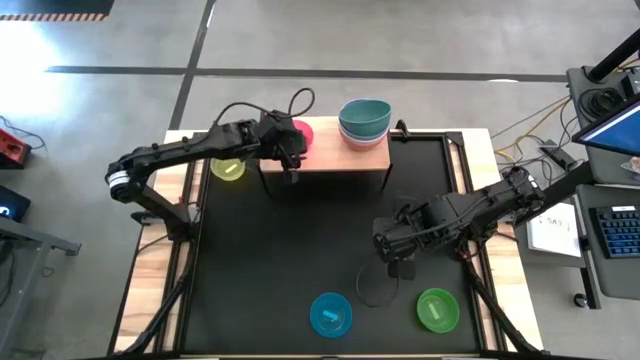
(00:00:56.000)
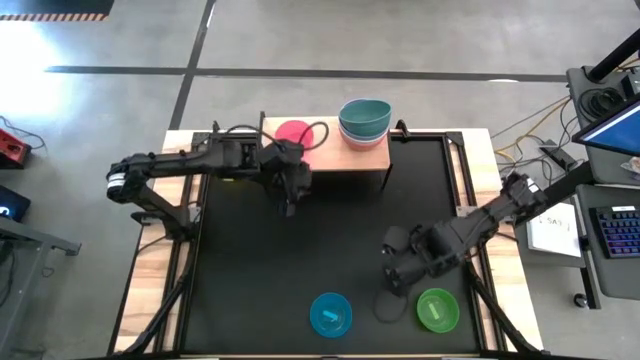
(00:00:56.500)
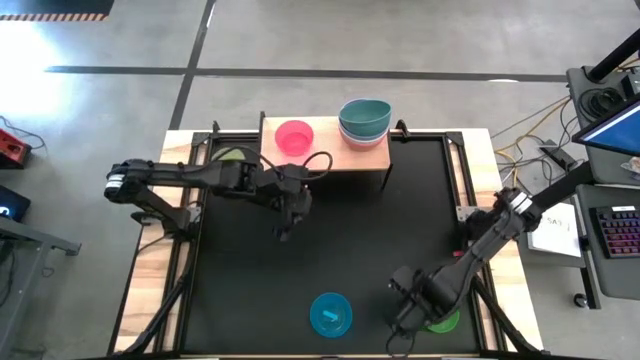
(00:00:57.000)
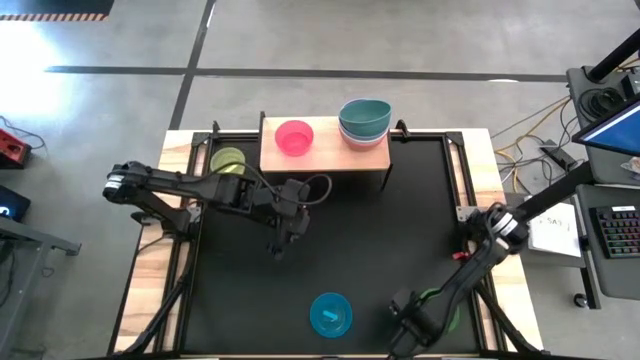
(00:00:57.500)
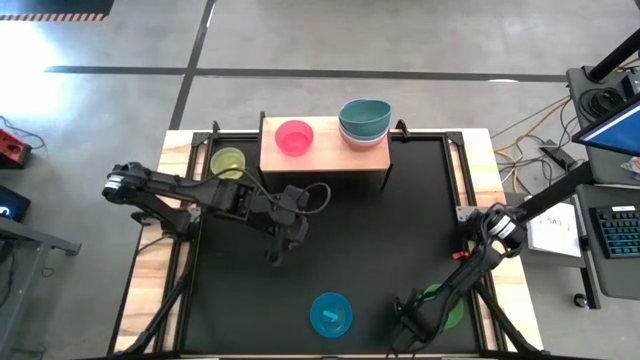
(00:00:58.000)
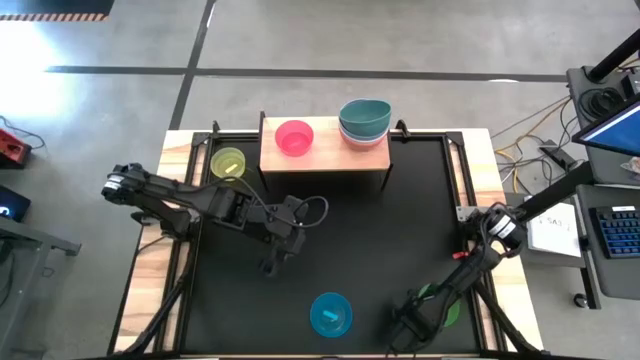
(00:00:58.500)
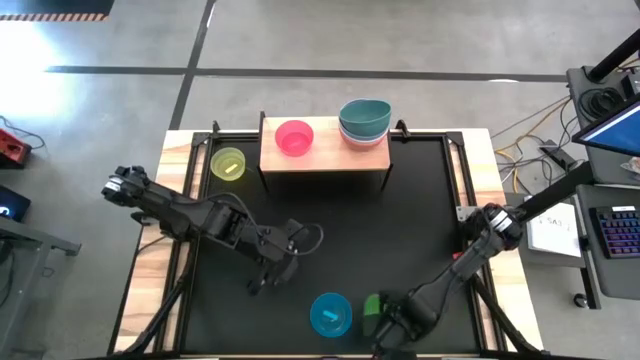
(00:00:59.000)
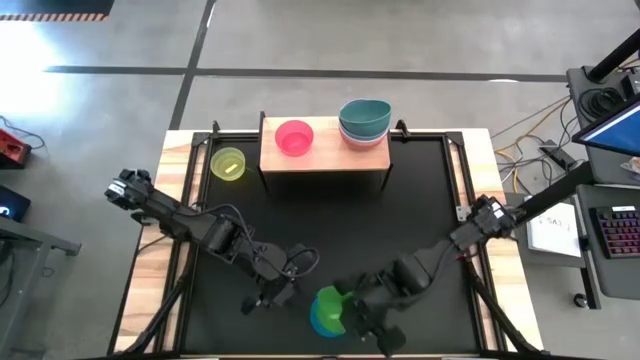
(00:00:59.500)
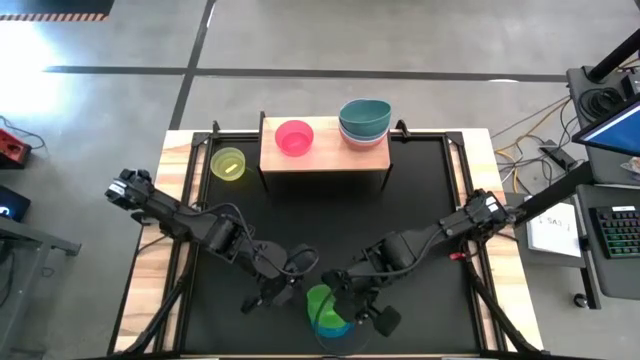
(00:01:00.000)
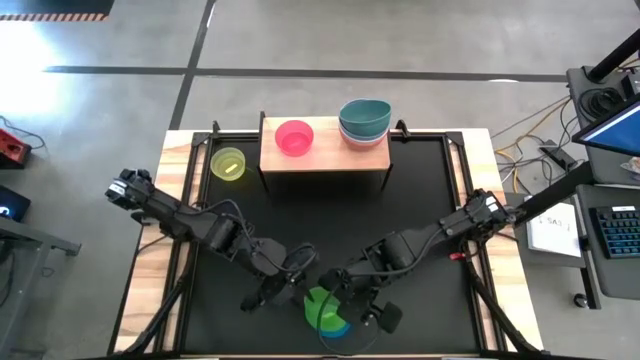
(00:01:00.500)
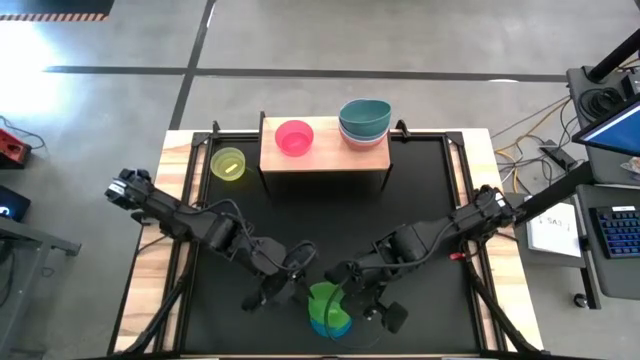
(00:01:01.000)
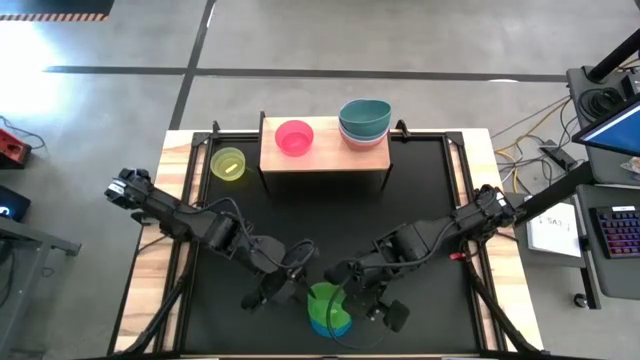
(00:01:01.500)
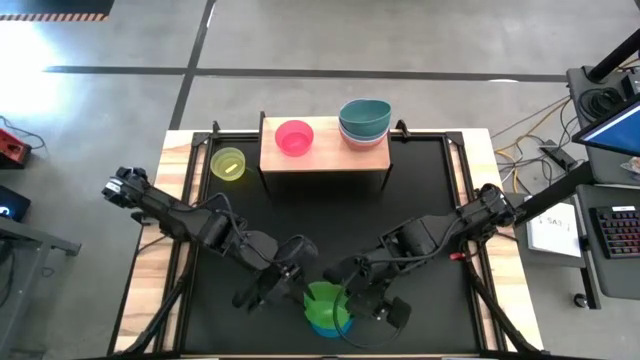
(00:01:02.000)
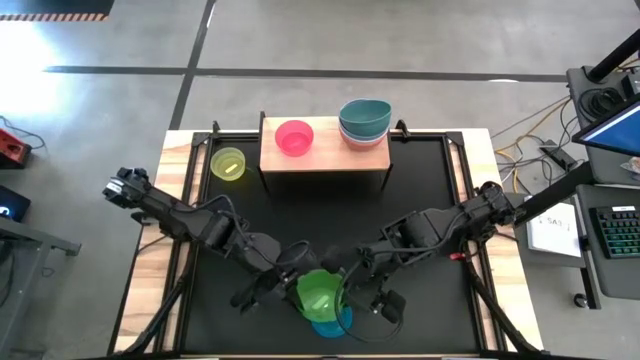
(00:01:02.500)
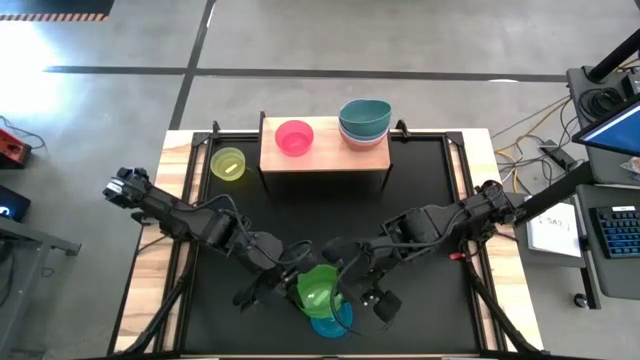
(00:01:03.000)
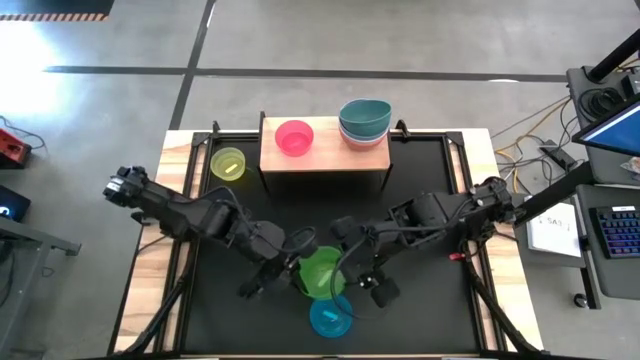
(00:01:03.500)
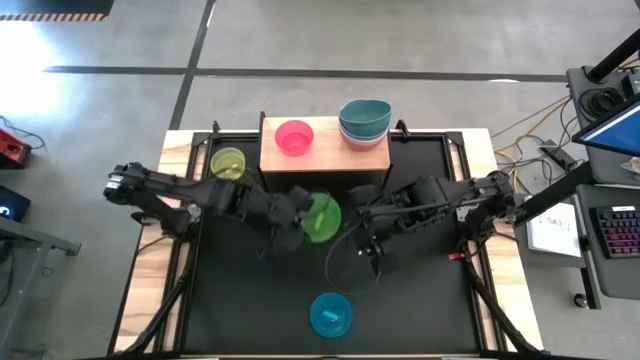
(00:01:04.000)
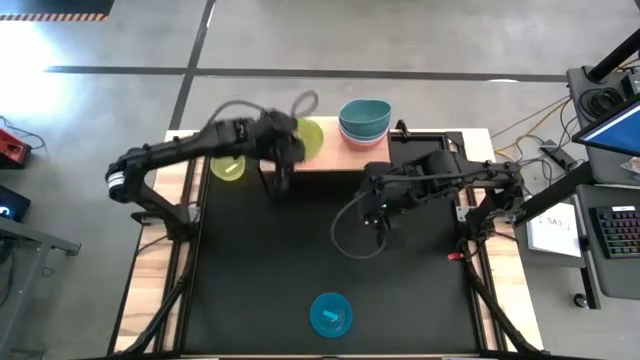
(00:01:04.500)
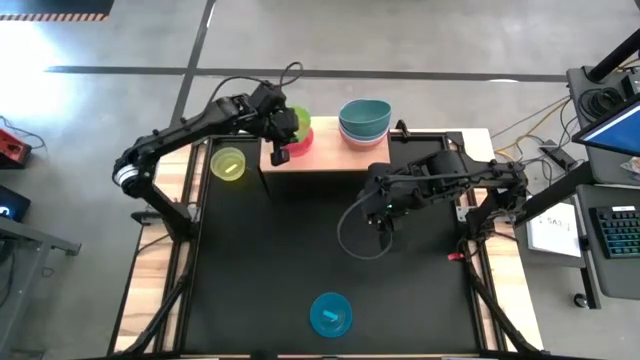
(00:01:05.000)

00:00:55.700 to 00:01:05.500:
Task: Place and stack bowls onto a shelf
Stack the transparent green bowl on top of the pink bowl

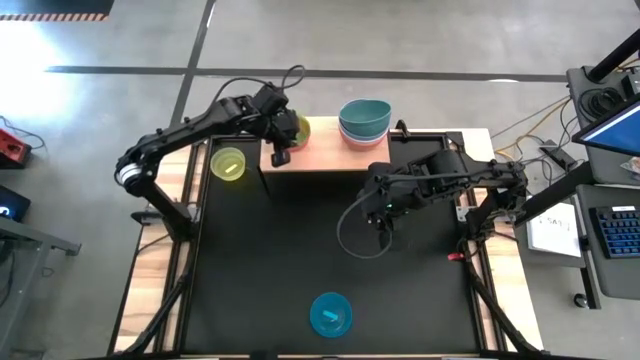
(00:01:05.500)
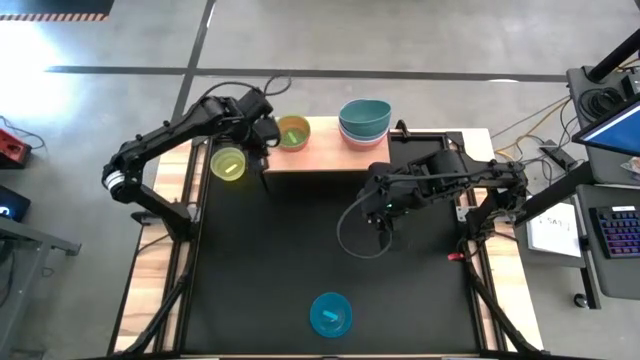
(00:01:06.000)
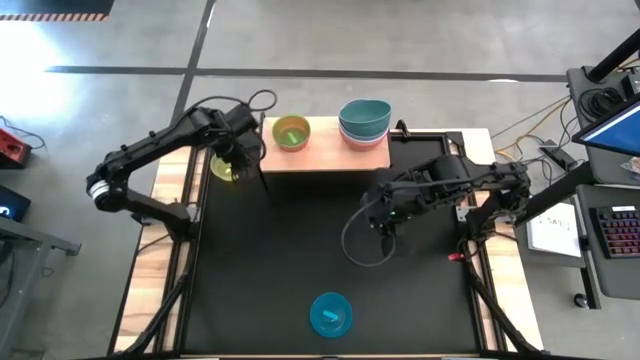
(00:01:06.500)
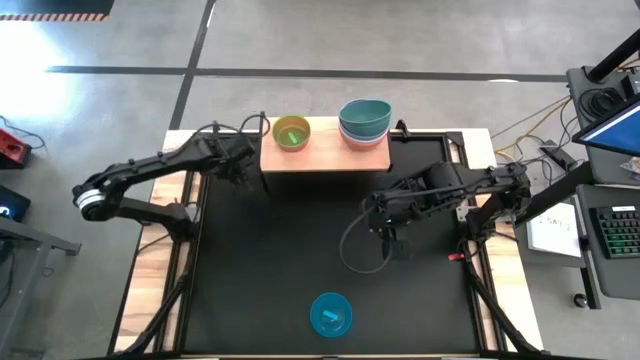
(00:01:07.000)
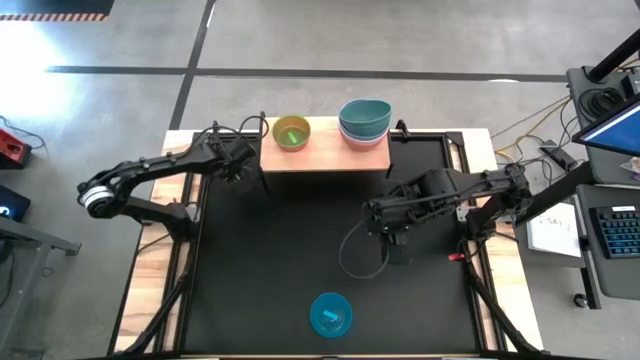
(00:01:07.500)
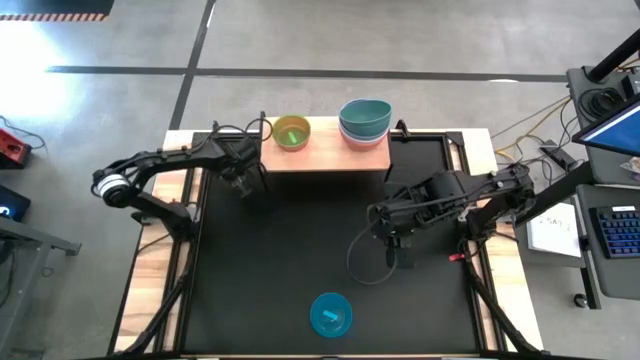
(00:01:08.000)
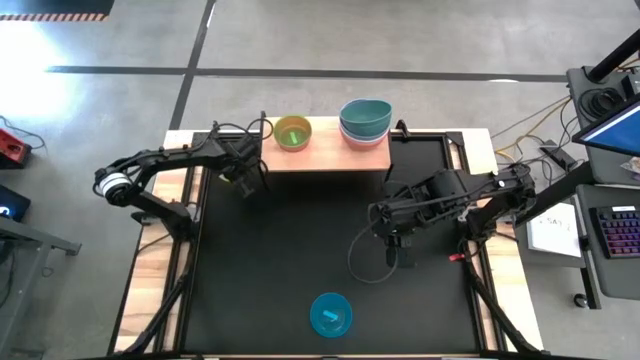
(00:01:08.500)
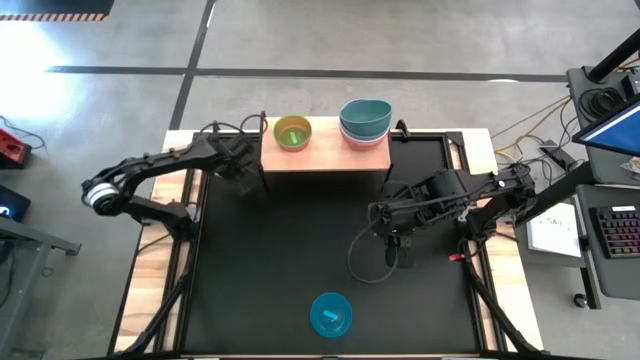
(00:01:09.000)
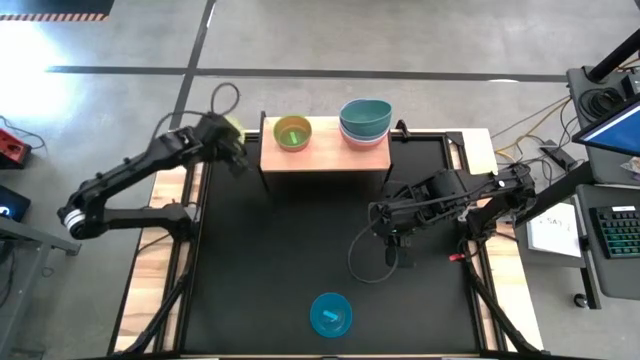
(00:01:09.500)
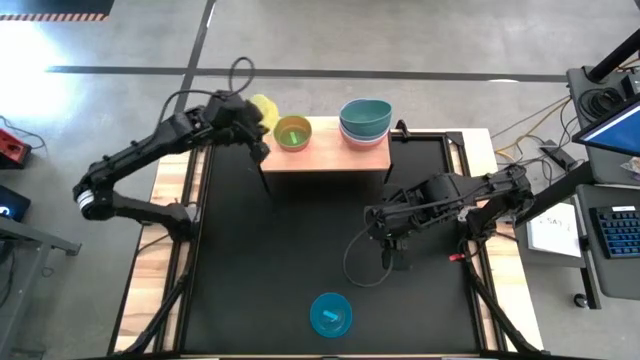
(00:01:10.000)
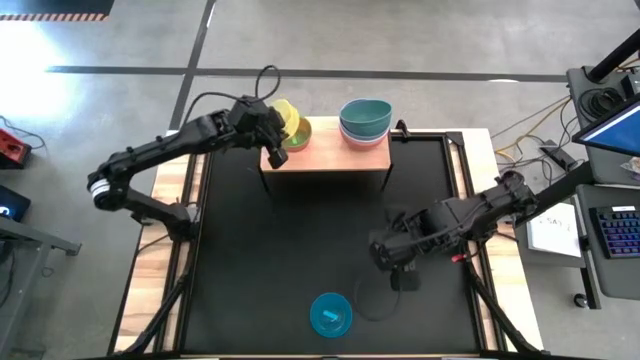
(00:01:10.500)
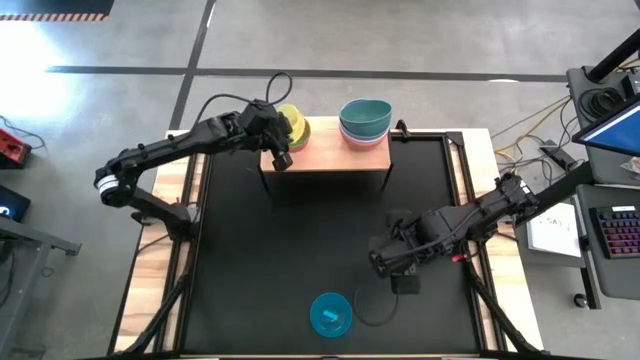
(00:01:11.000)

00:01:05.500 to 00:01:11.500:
Stack the yellow bowl on top of the green bowl

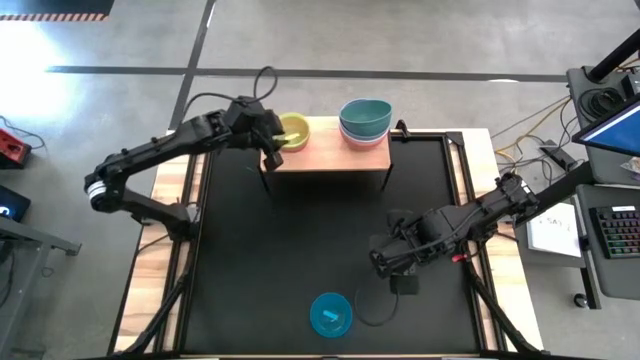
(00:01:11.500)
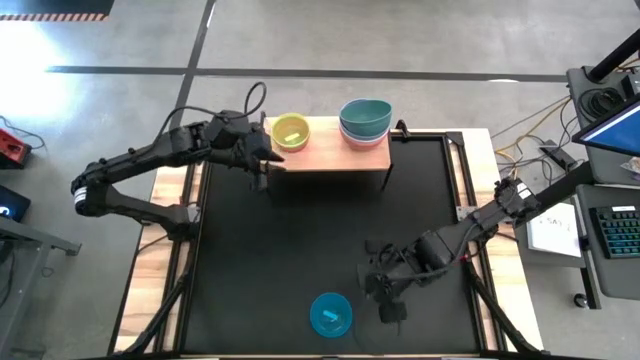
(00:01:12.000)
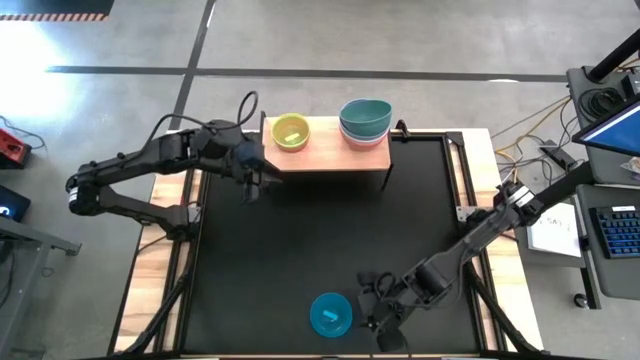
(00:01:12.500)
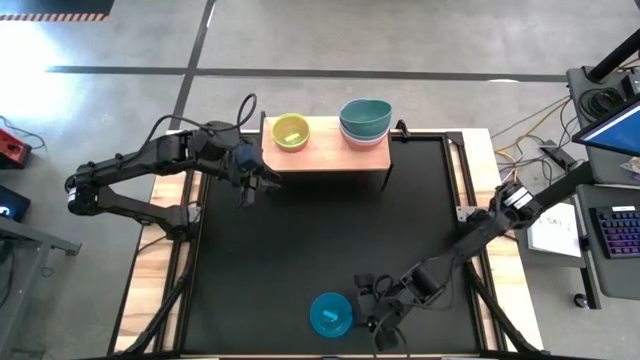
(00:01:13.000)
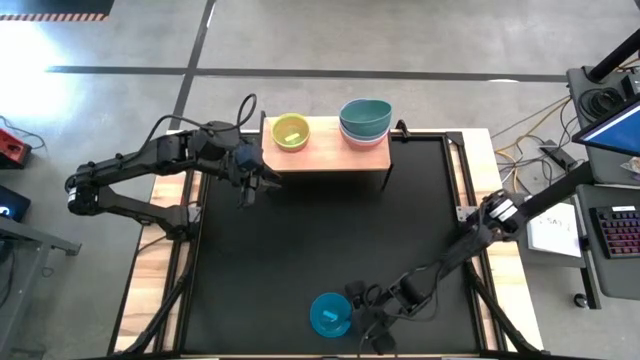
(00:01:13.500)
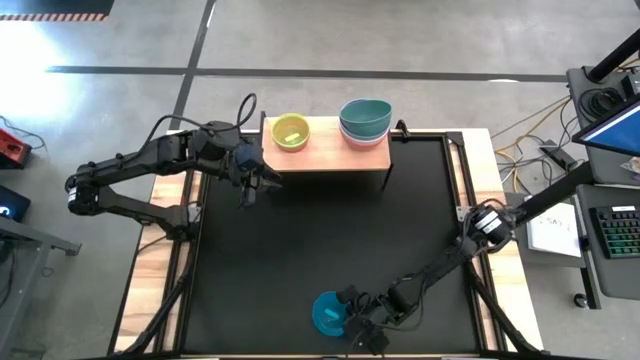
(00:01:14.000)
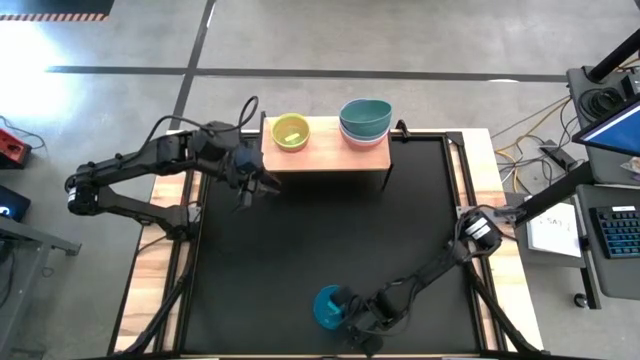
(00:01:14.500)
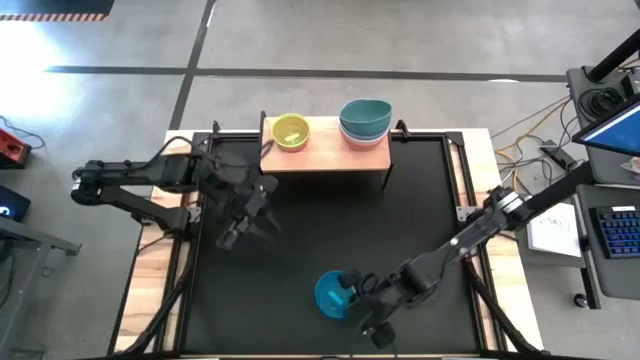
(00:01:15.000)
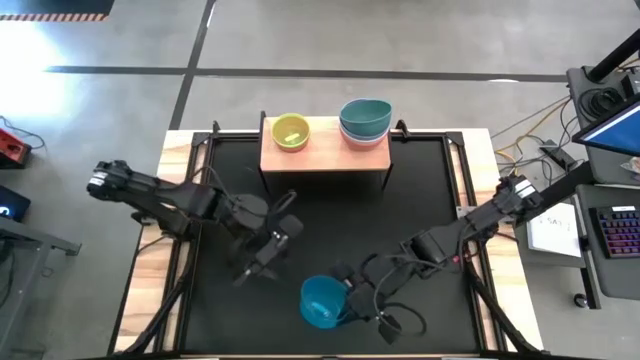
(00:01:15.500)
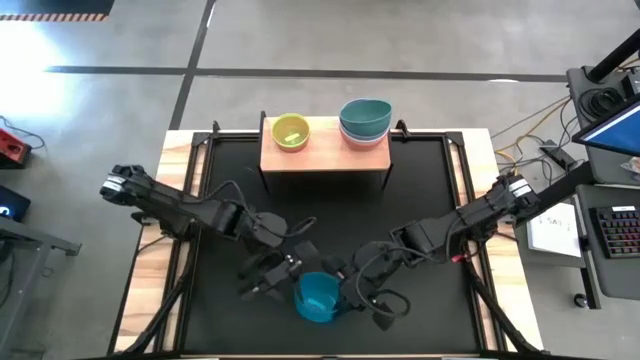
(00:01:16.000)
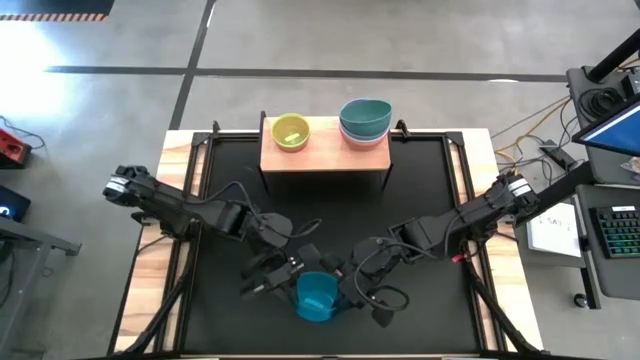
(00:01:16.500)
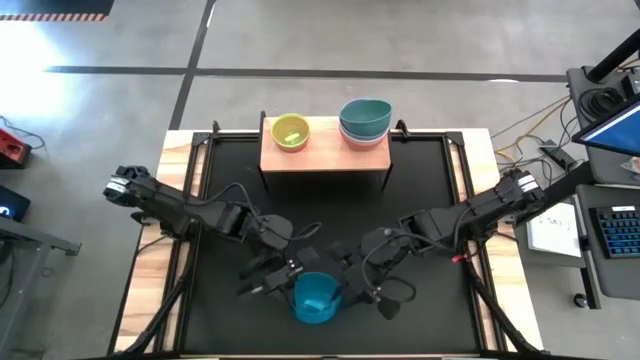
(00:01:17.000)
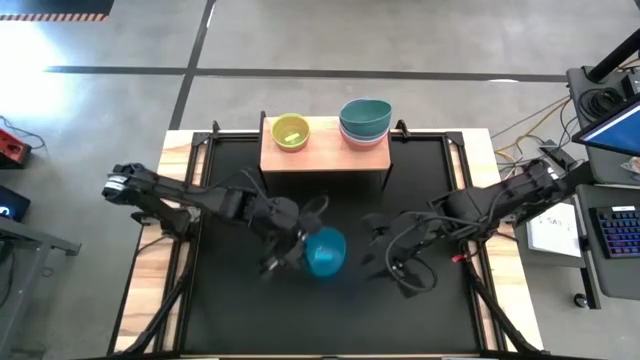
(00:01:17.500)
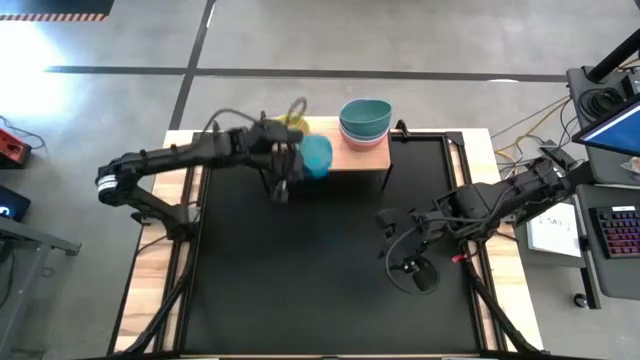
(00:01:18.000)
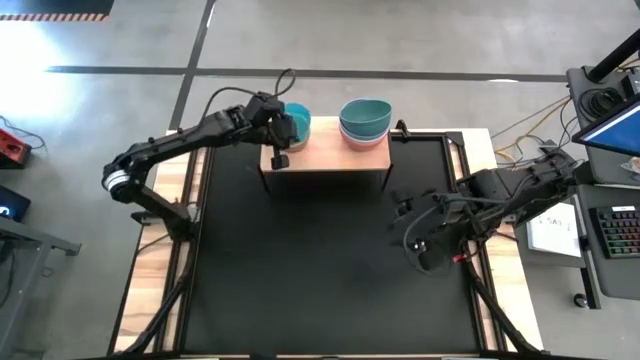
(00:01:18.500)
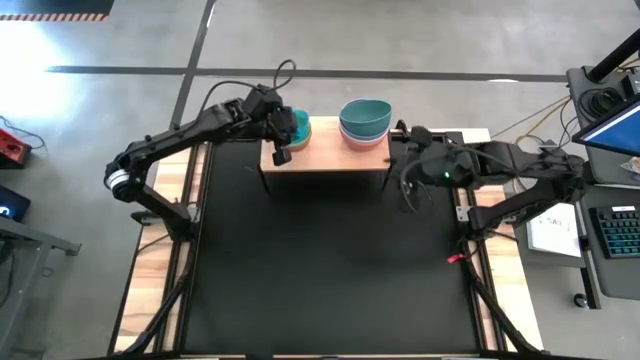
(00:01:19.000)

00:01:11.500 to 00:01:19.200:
Stack the blue bowl on top of the yellow bowl
